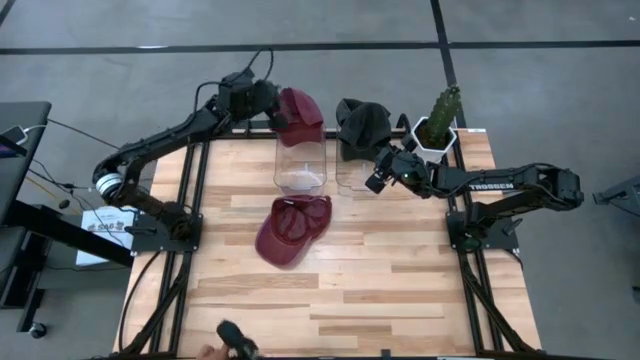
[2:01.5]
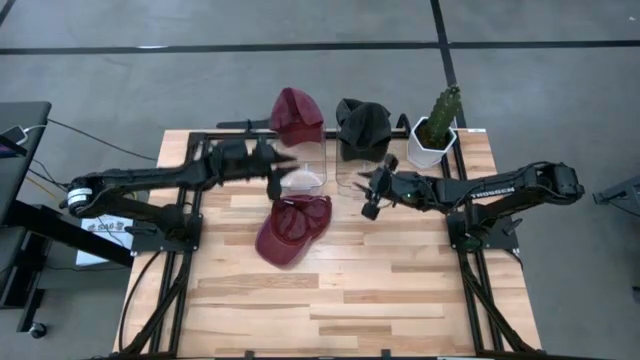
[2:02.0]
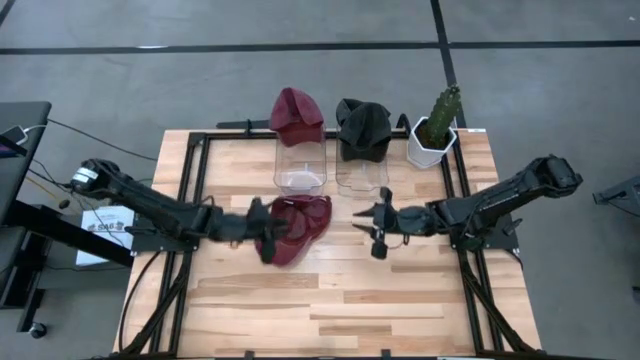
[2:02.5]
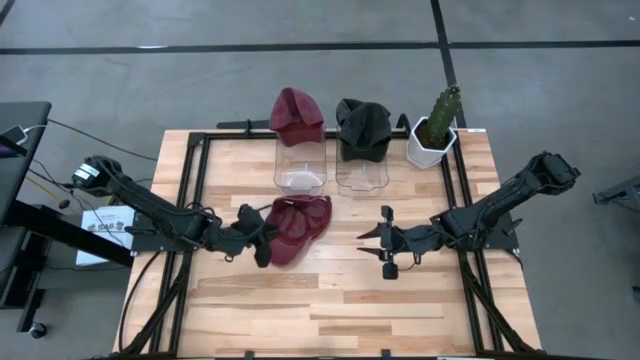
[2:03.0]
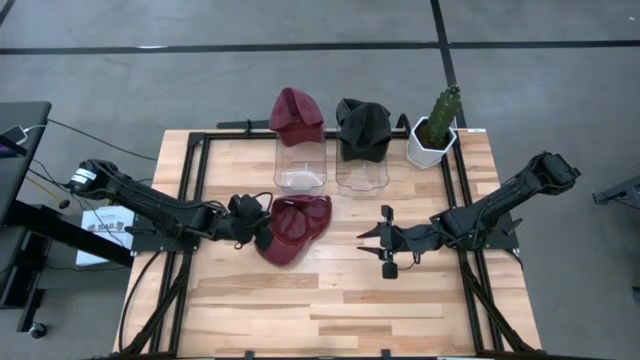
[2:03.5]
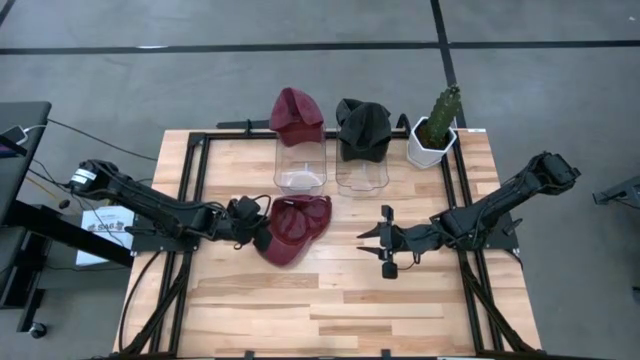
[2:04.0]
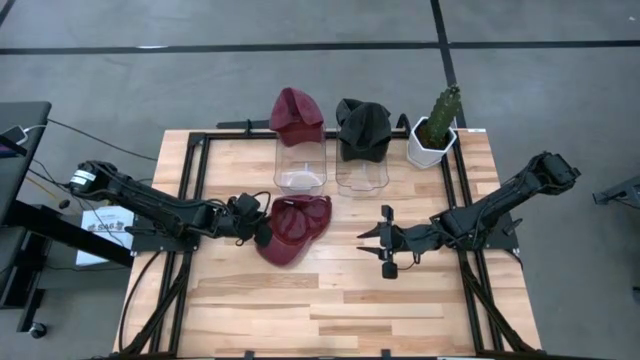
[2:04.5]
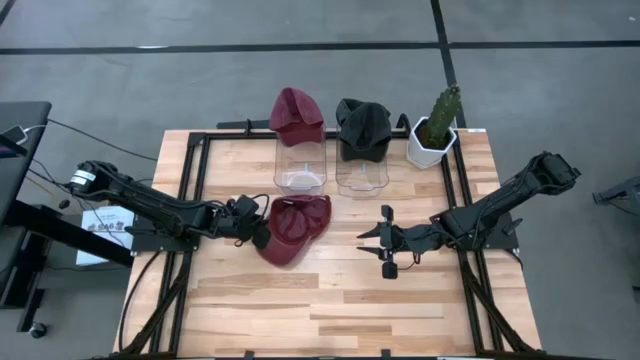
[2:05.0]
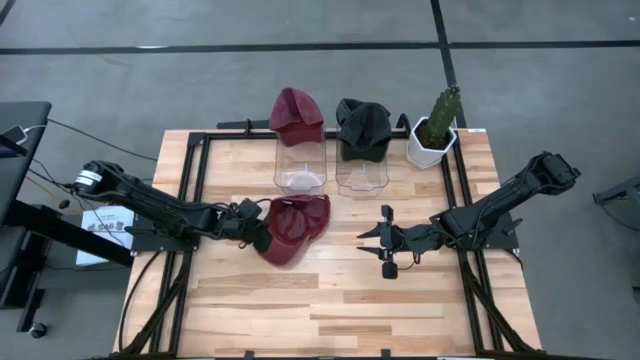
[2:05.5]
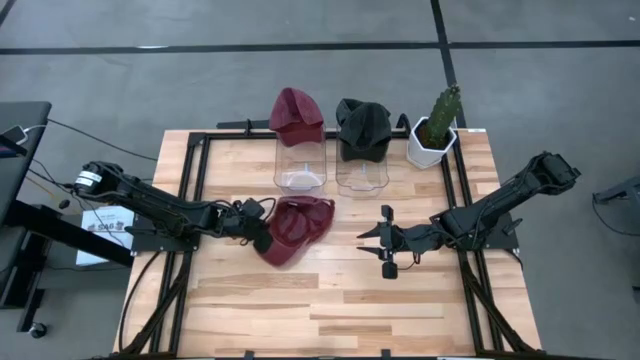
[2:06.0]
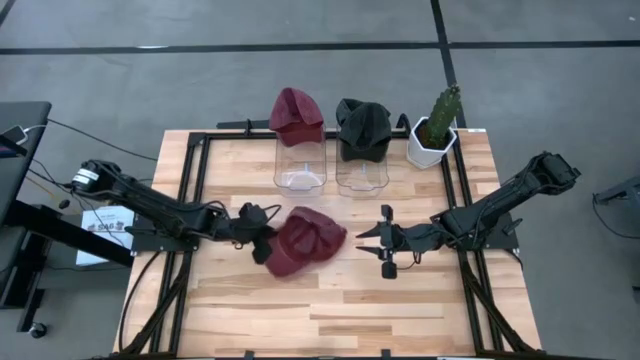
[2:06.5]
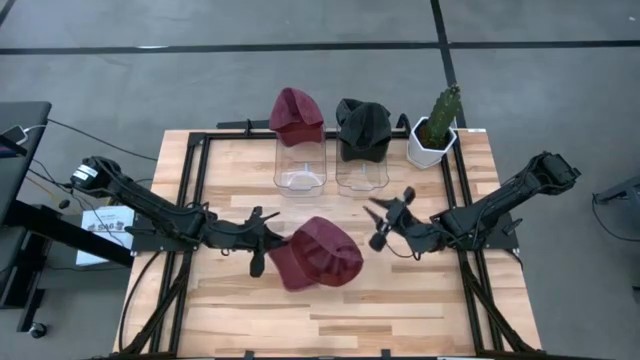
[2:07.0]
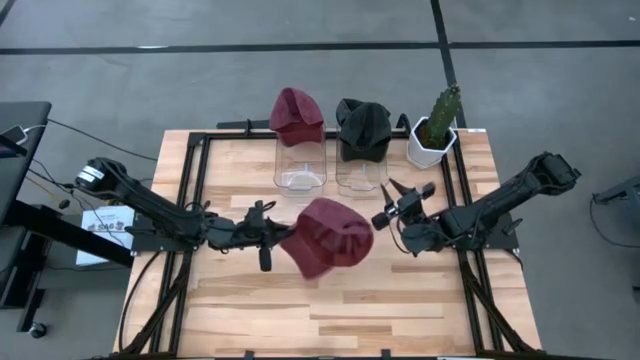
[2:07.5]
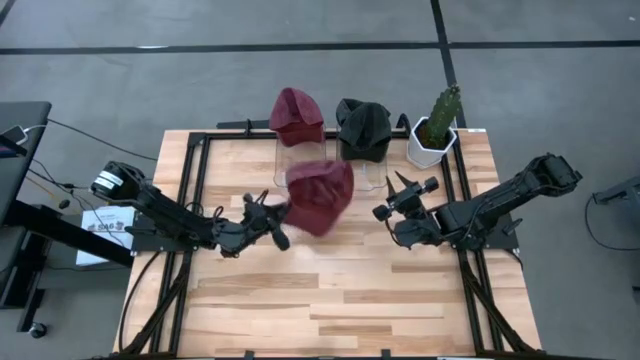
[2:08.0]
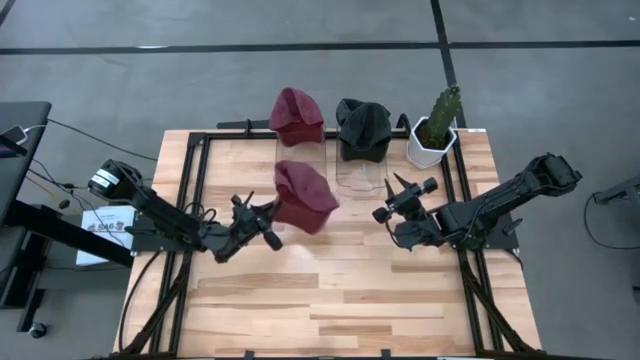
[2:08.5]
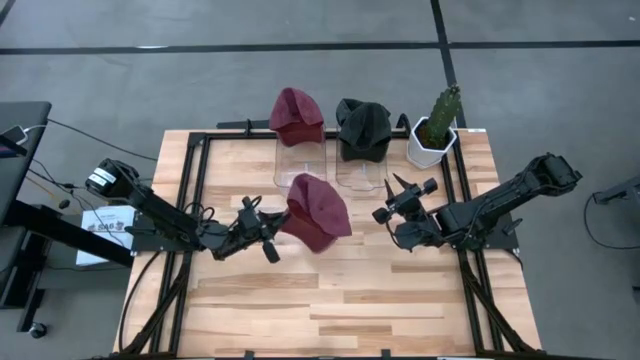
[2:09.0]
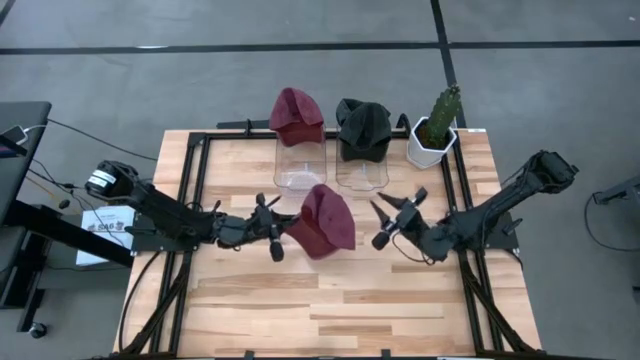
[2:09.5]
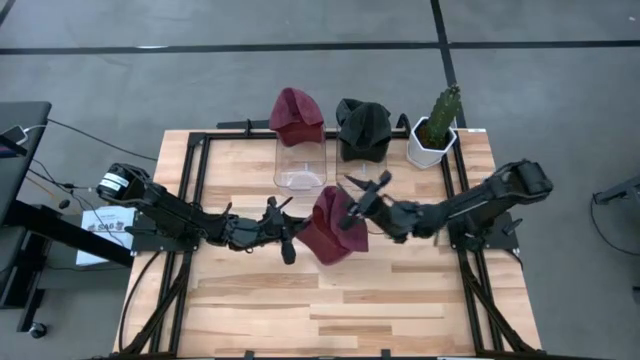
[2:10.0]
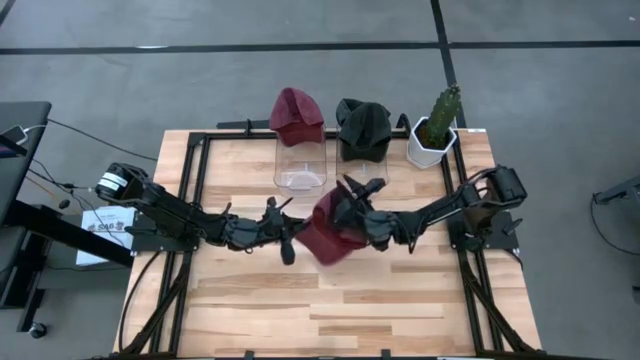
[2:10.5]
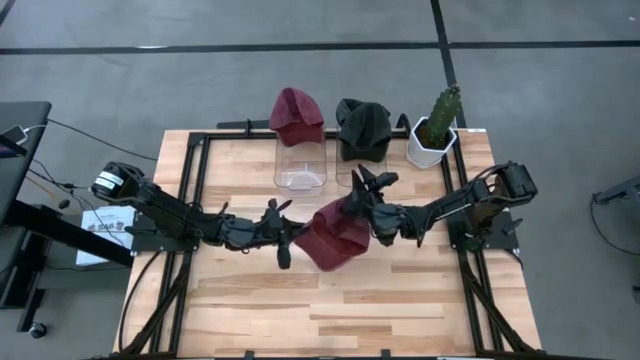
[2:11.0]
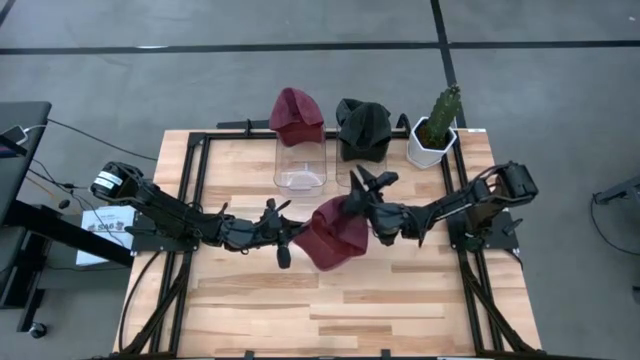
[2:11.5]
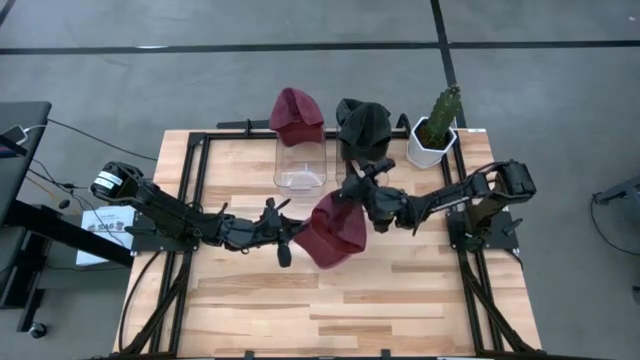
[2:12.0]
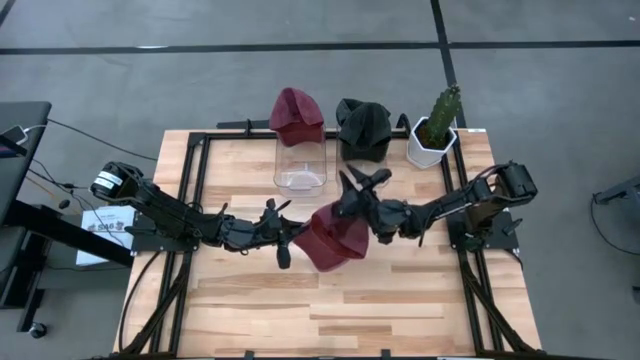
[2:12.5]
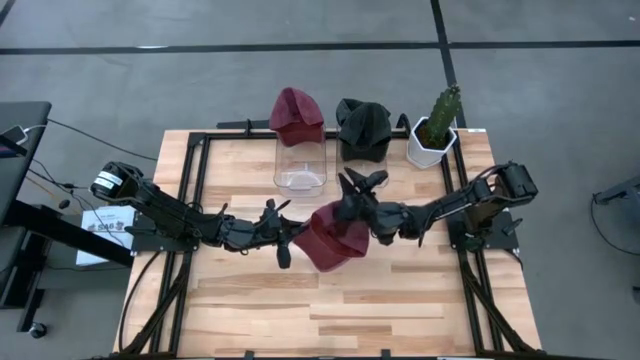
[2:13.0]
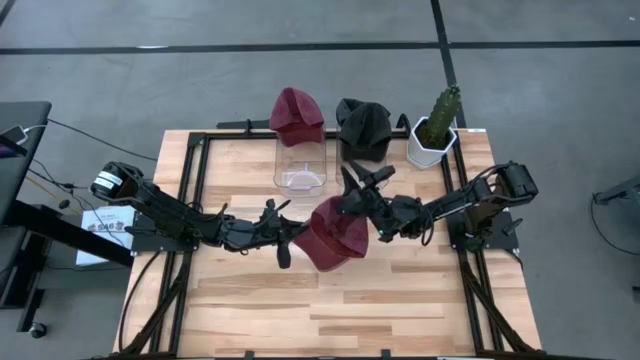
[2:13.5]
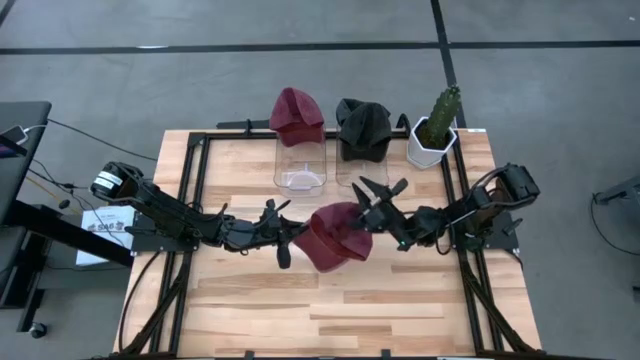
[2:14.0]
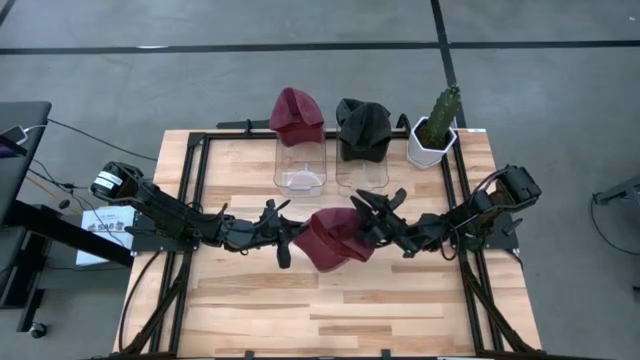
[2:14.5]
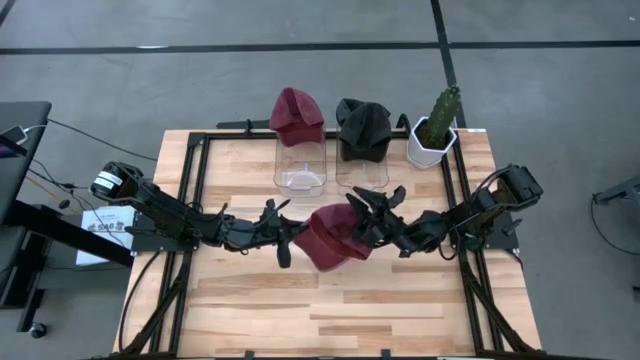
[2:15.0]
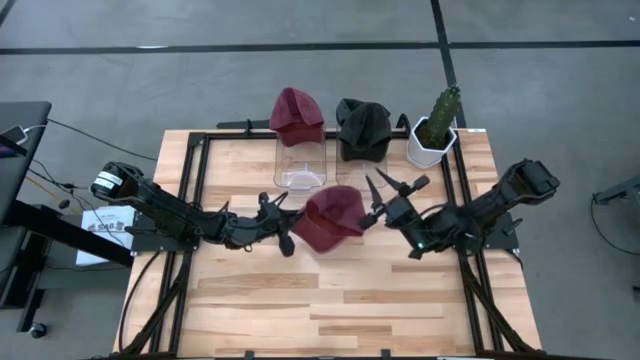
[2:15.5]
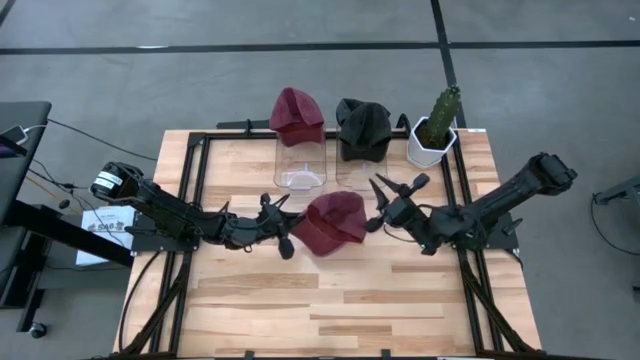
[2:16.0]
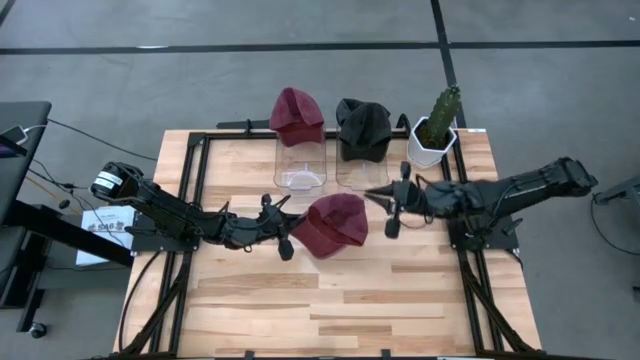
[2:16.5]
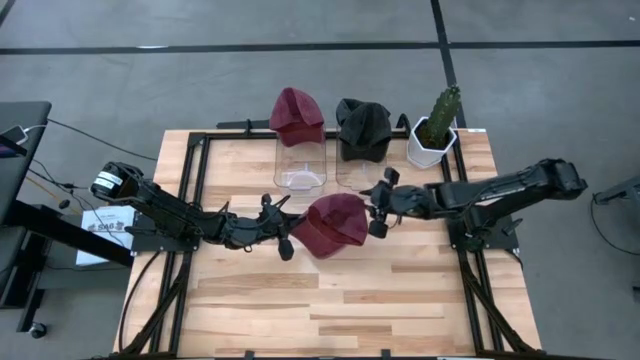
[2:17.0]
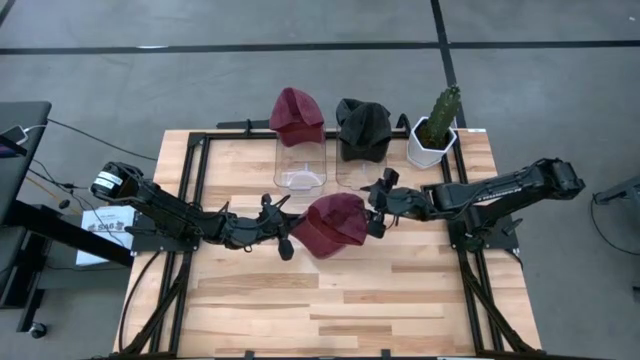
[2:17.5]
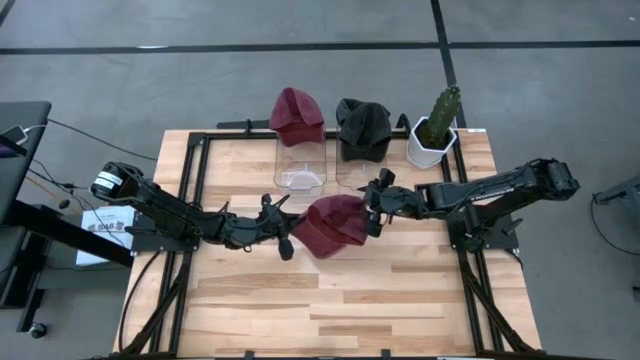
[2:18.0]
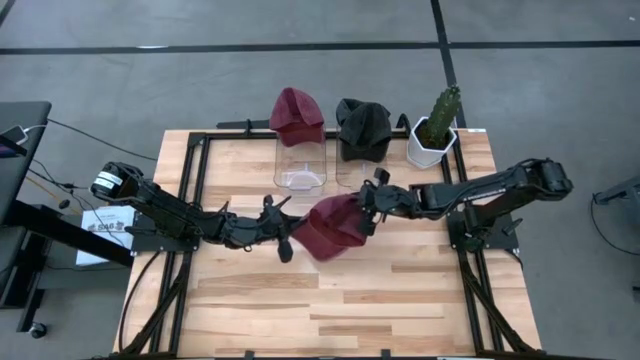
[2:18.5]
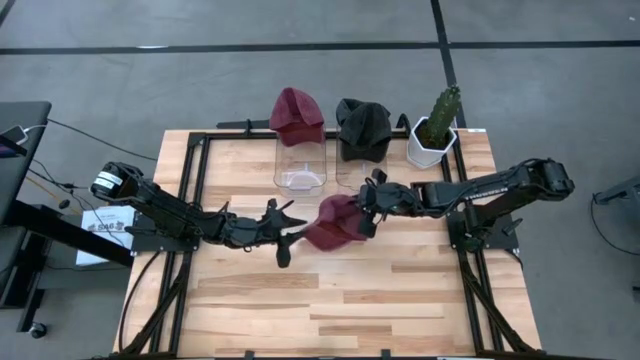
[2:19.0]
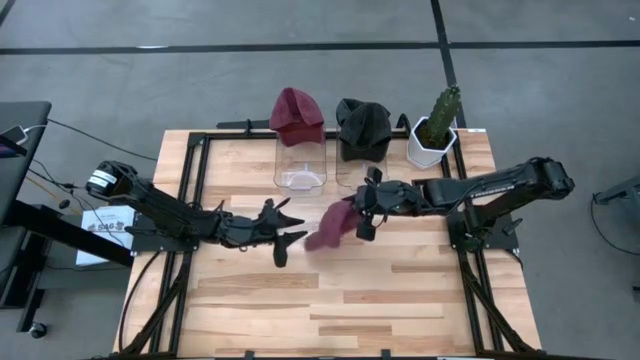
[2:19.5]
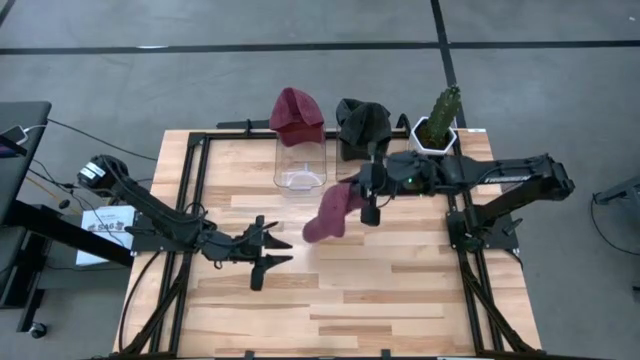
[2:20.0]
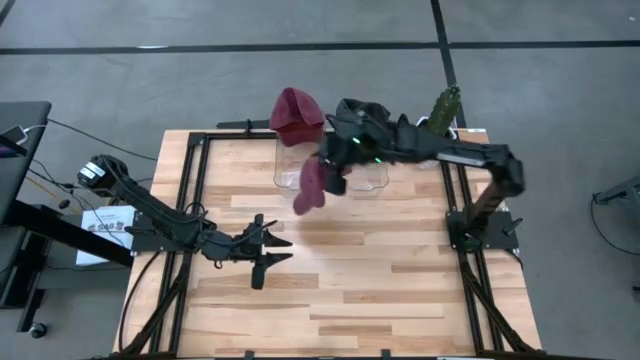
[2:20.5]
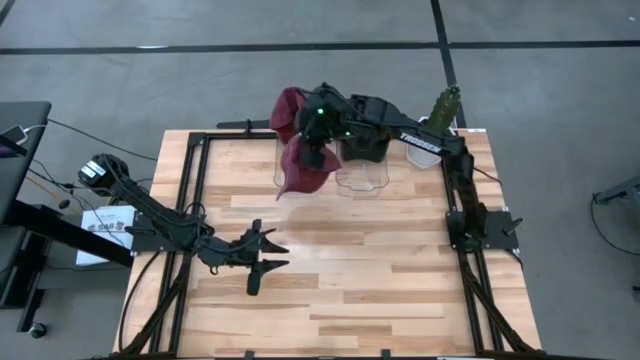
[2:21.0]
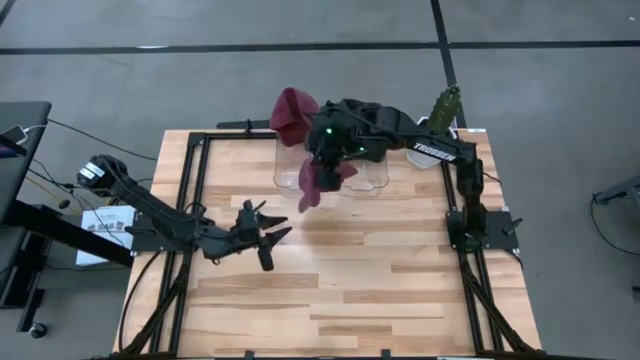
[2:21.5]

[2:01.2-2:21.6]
Task: Pick & Place hat
Put the red cap into the left transparent bin
